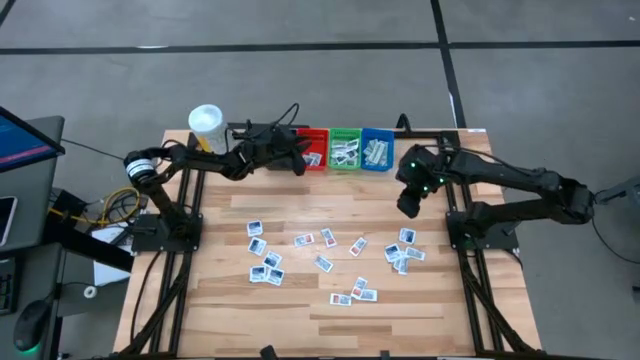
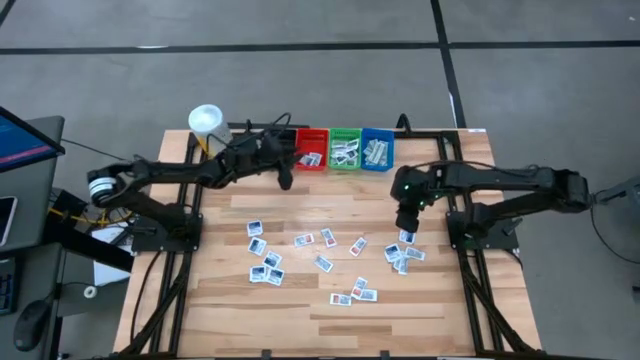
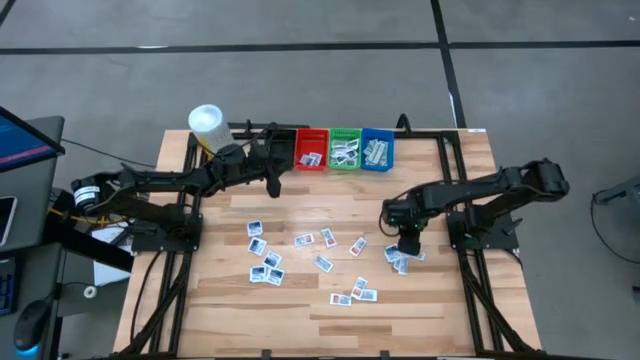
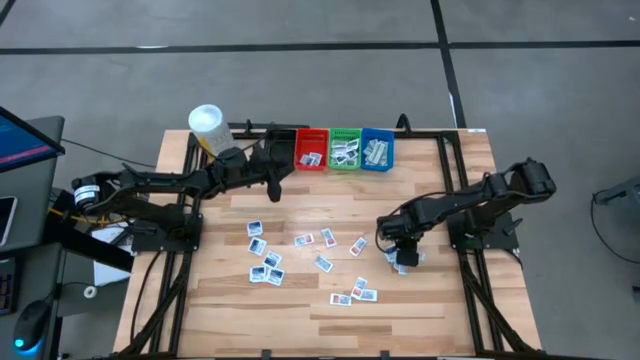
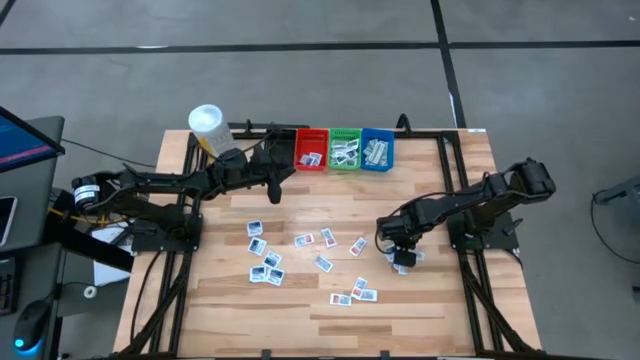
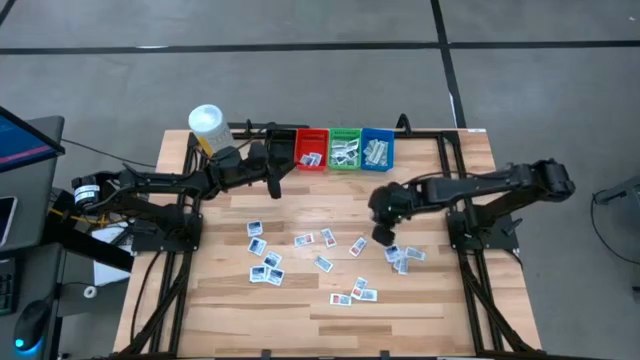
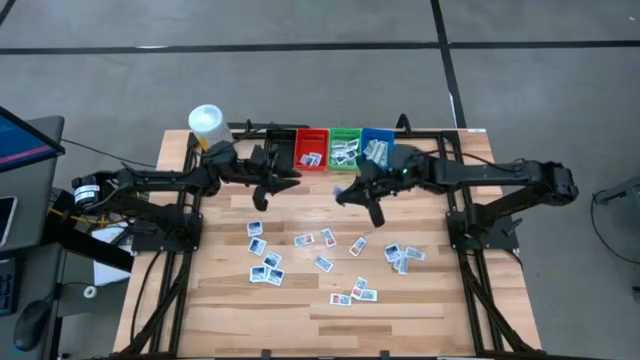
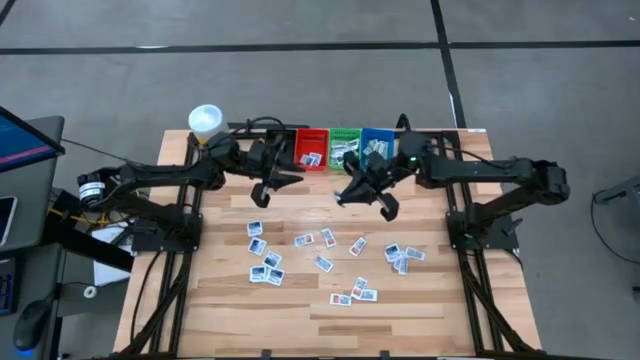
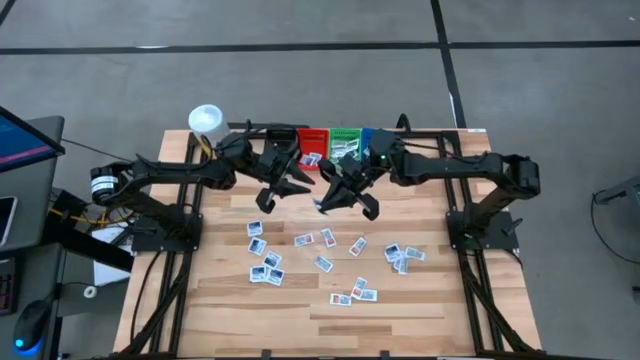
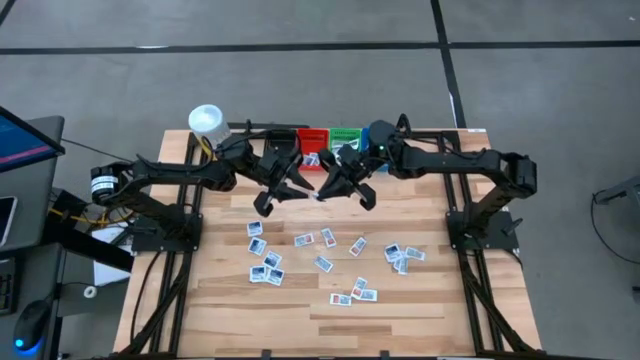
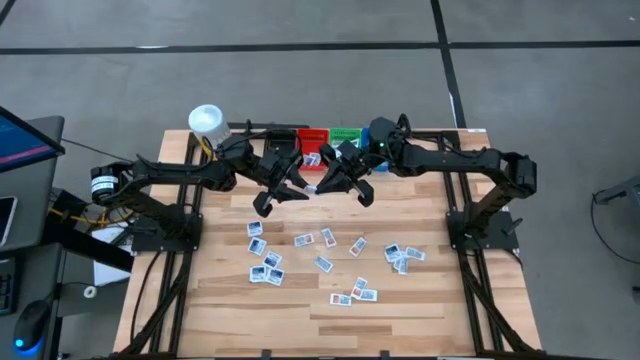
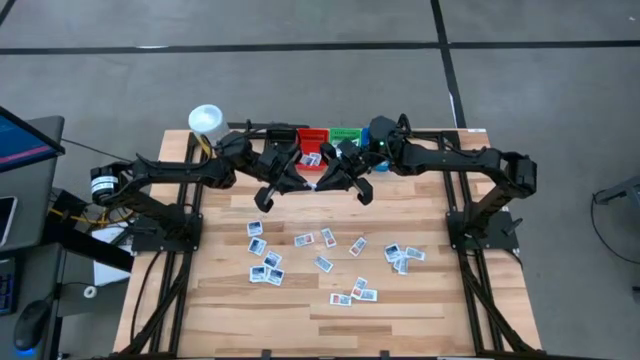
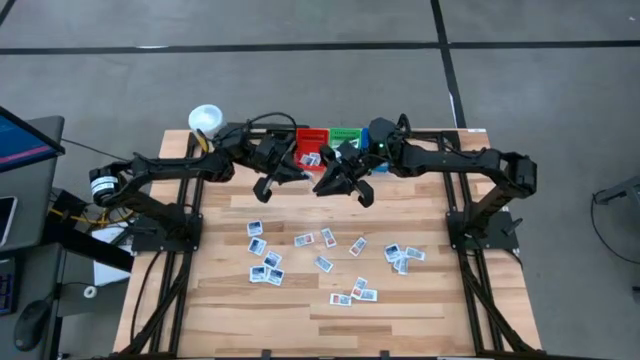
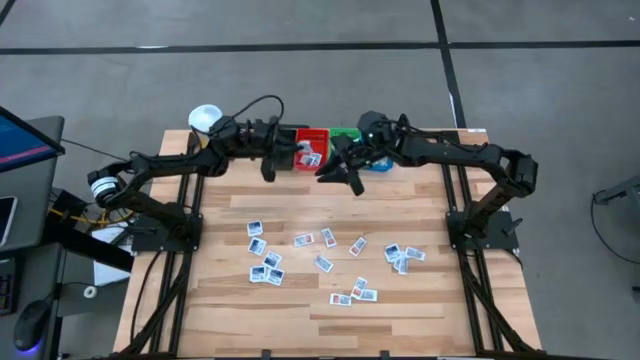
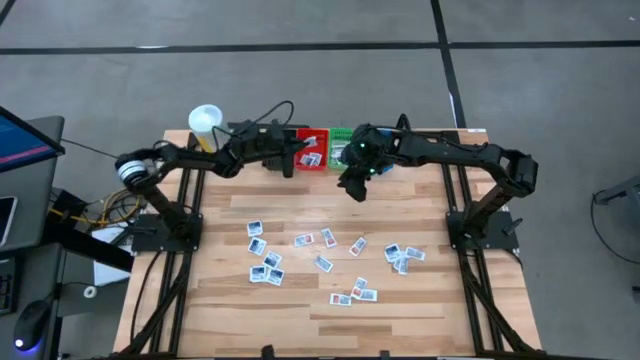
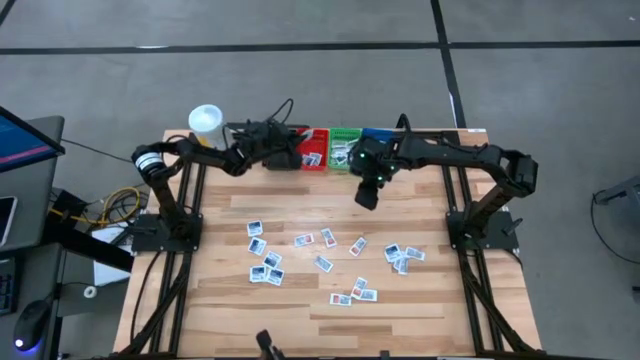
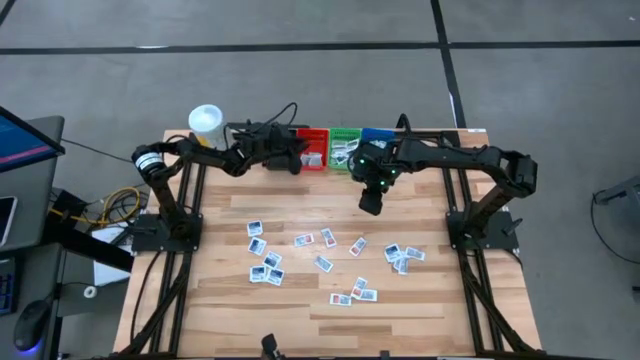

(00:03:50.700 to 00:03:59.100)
Task: Pick & Place First Aid Supplies
Put the alcohol pad into the red bin

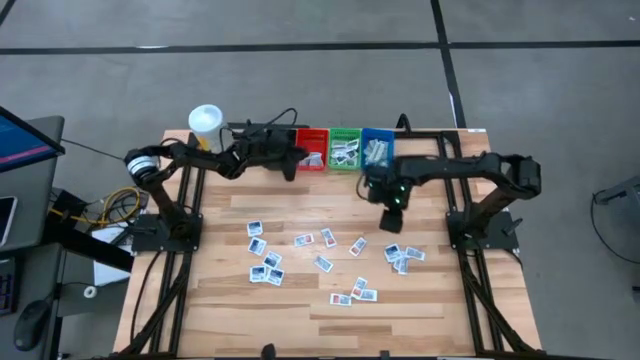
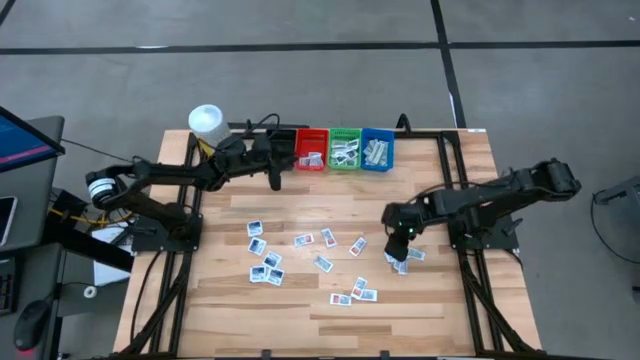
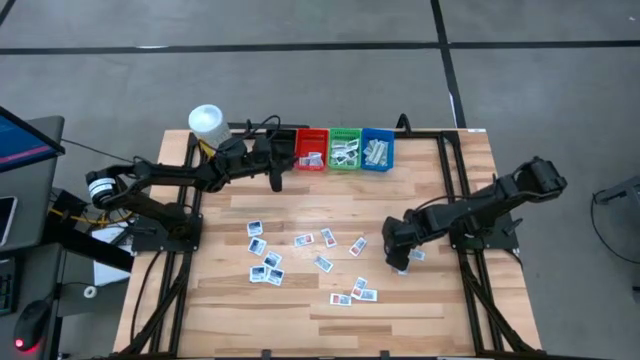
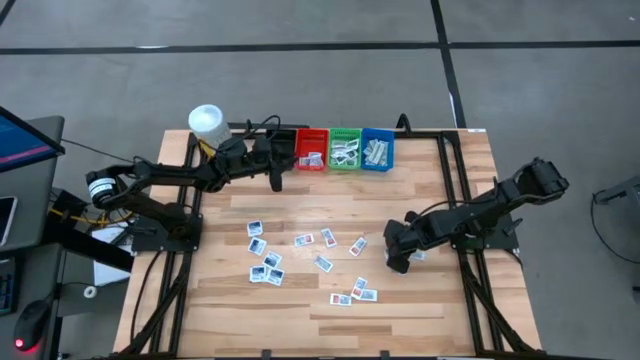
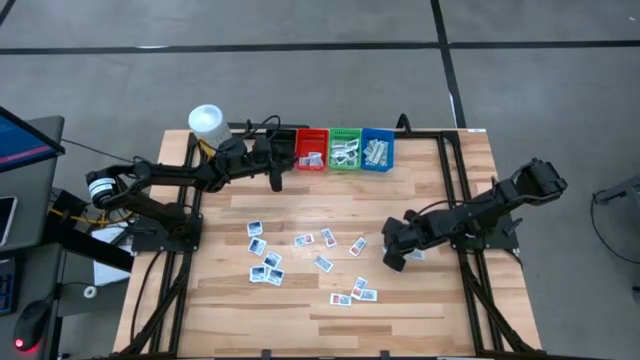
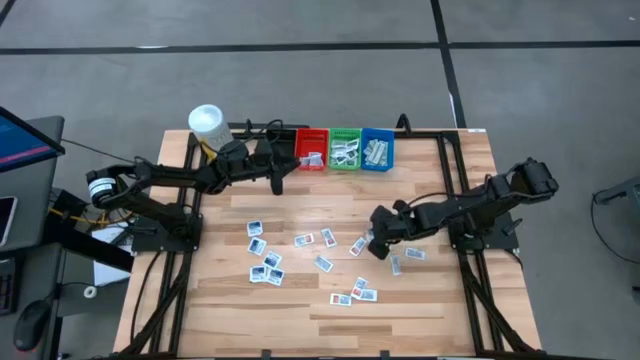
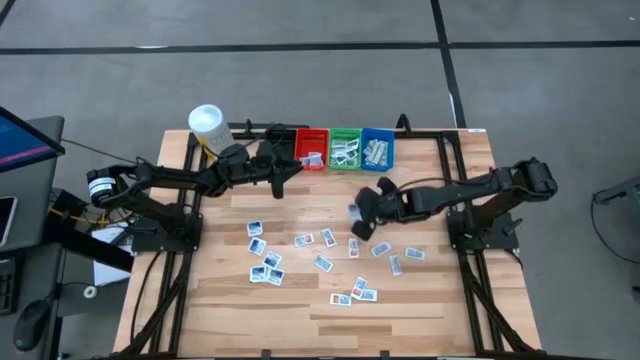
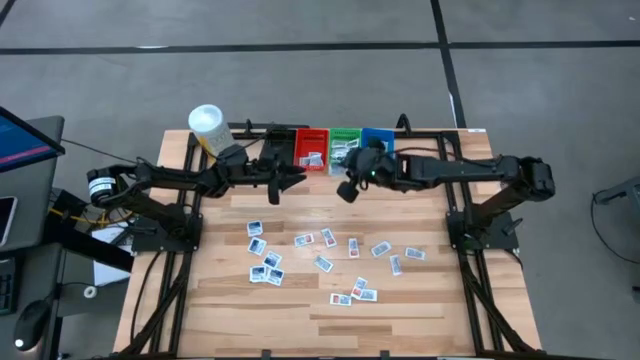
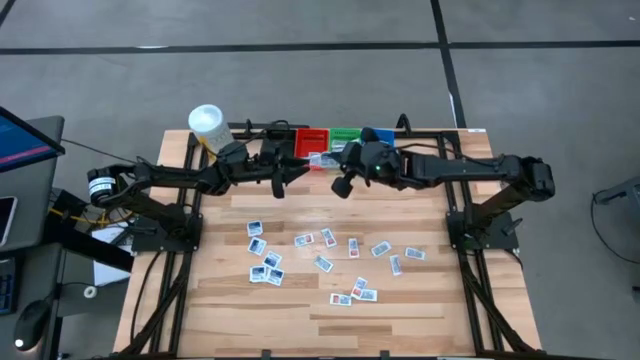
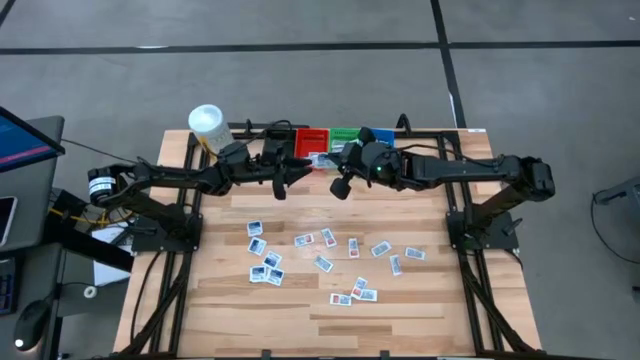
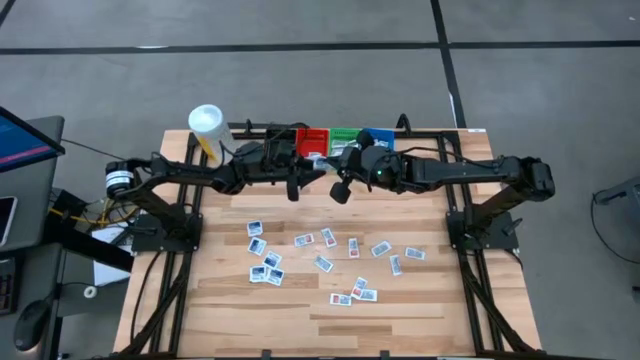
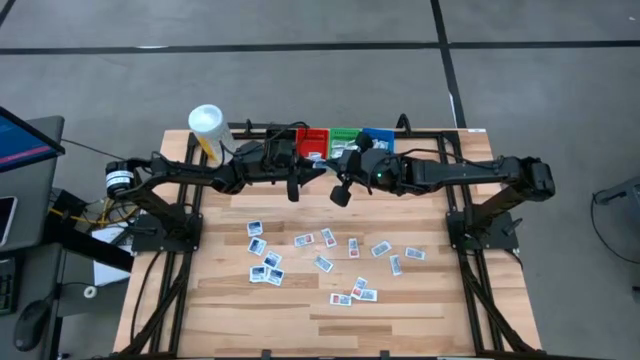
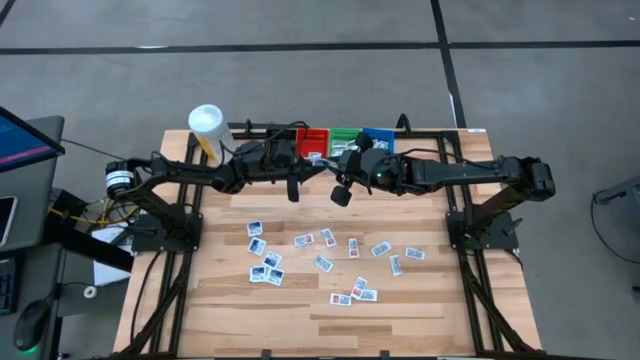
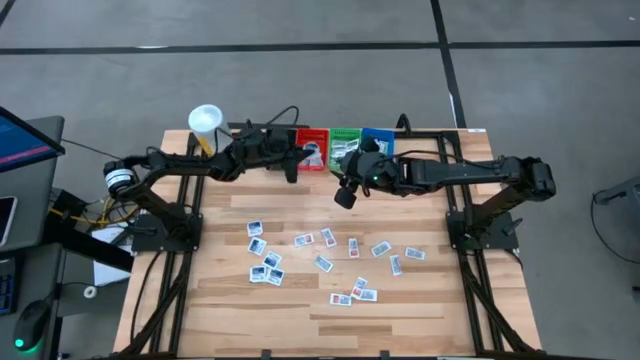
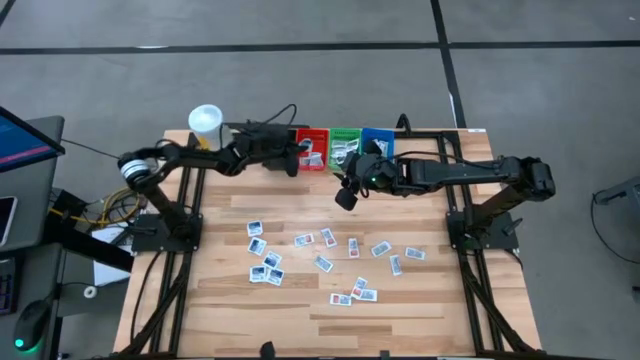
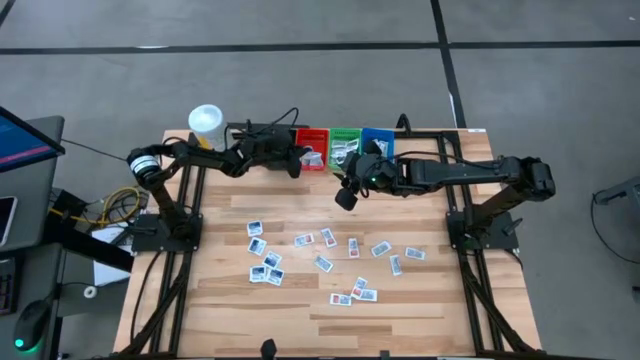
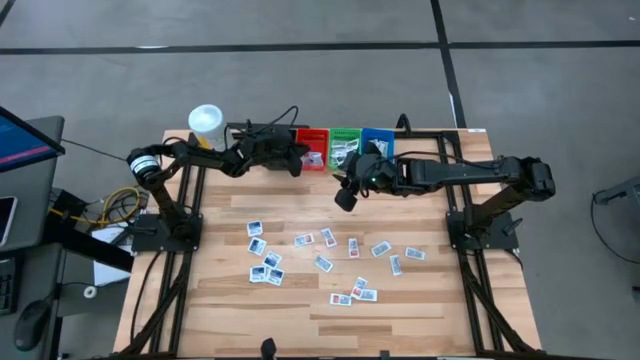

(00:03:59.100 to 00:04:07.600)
Put the alcohol pad into the red bin

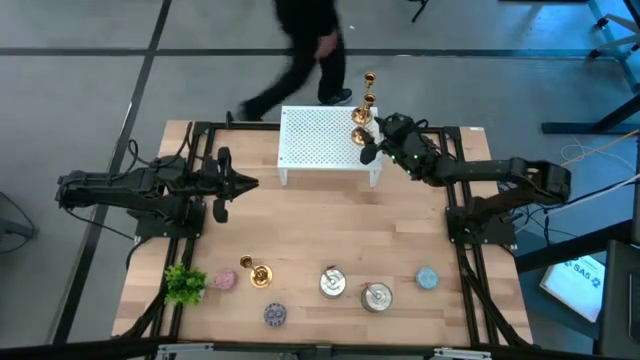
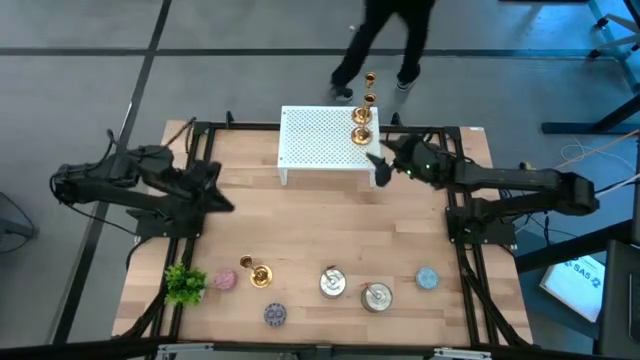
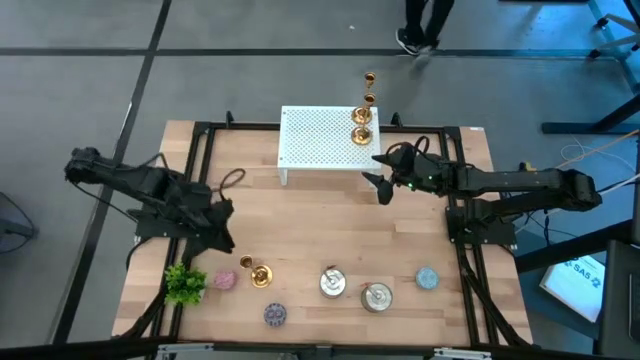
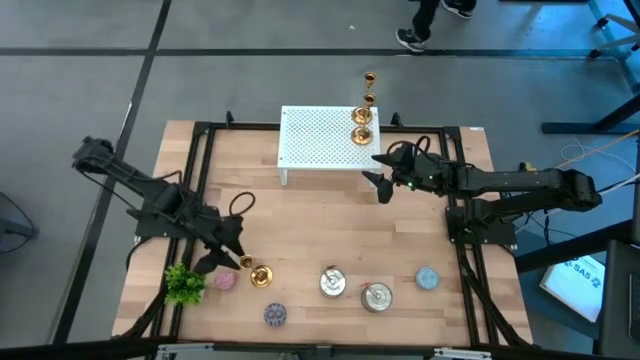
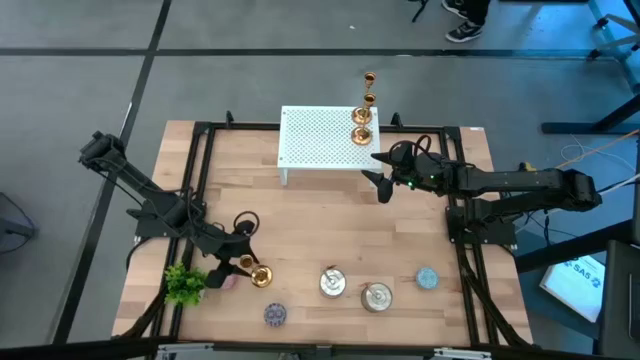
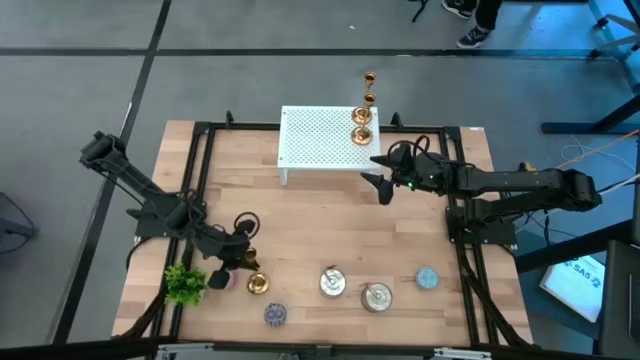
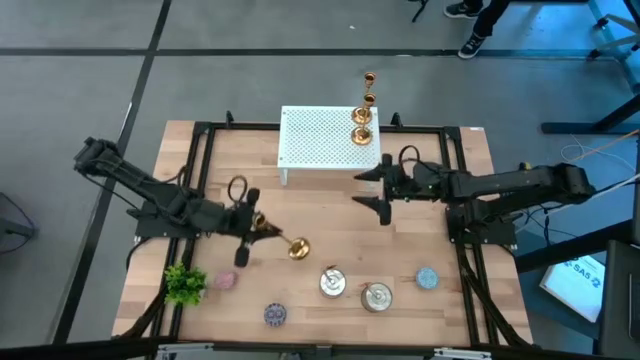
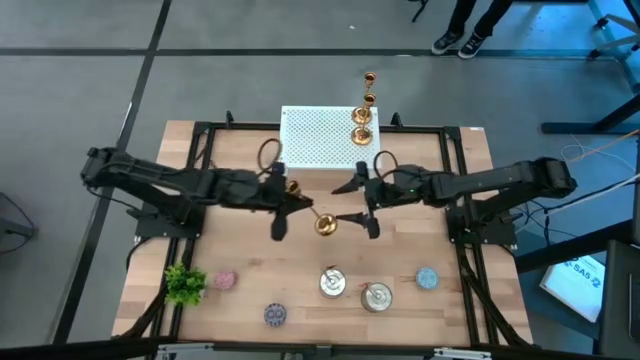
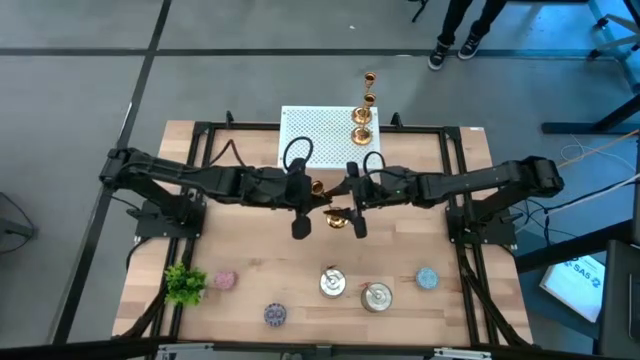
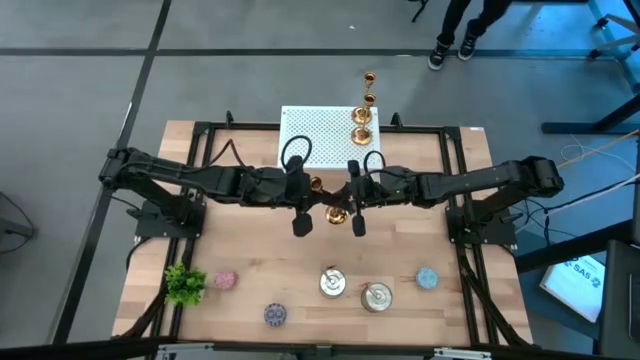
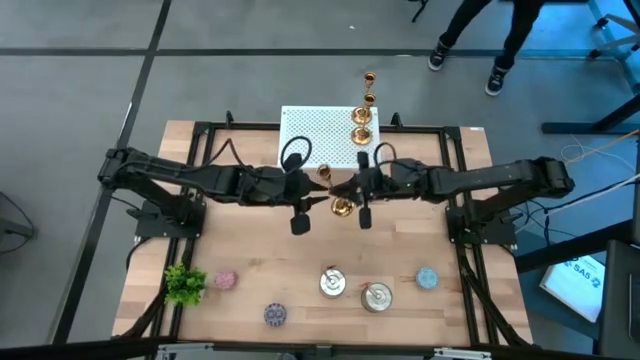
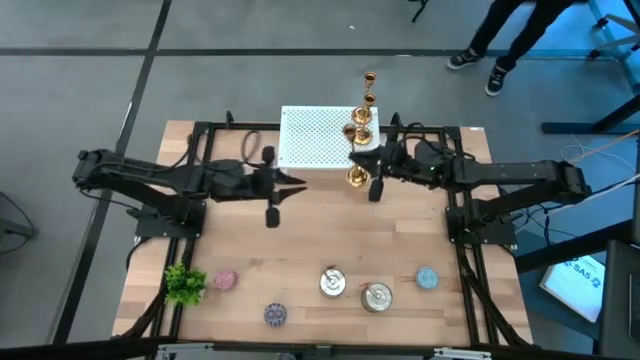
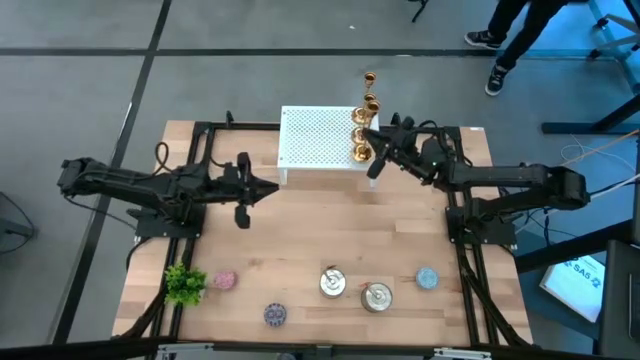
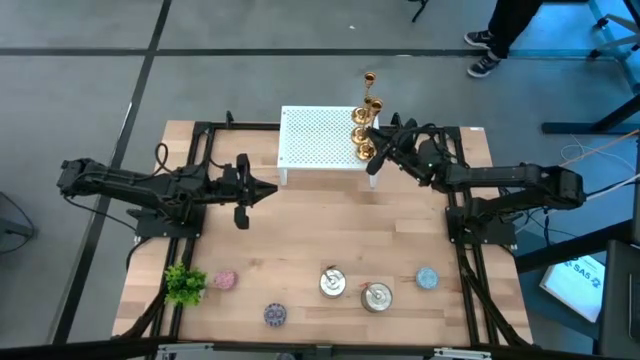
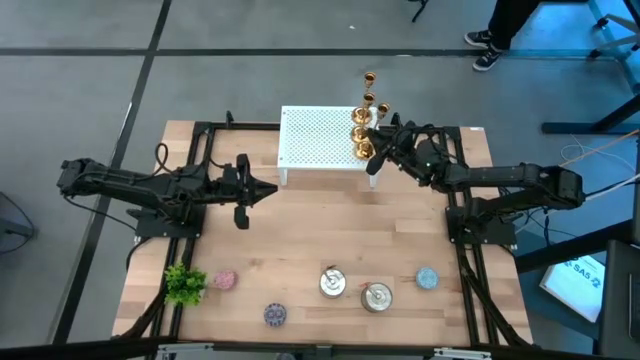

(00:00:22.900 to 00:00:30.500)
Task: Pick & Place candle stick holders
Put the gold candle holder on the shelf and align it with the other gold candle holders
